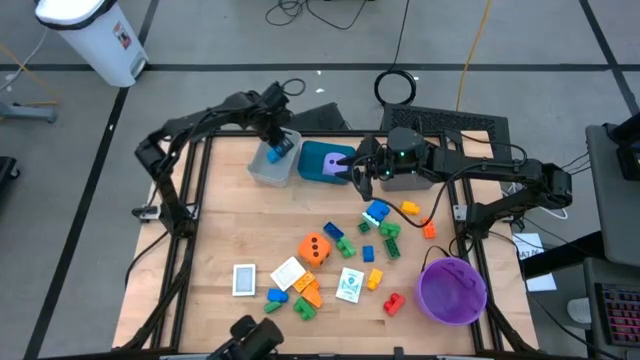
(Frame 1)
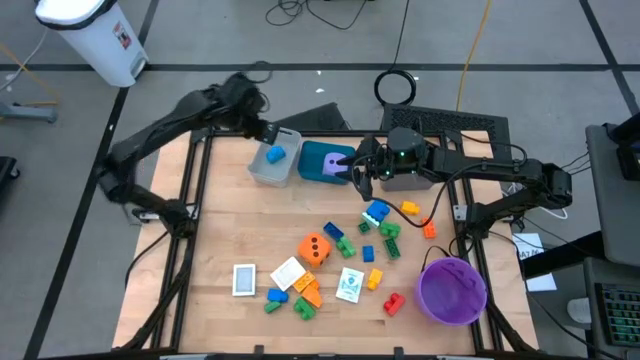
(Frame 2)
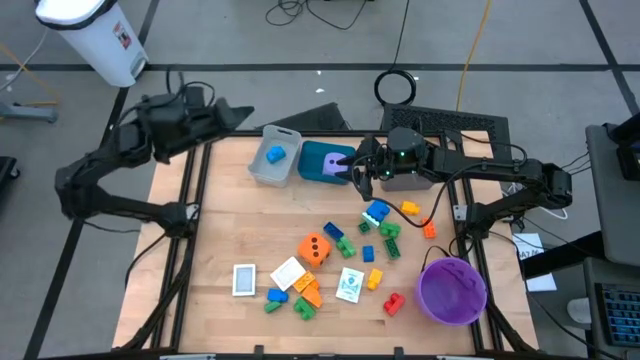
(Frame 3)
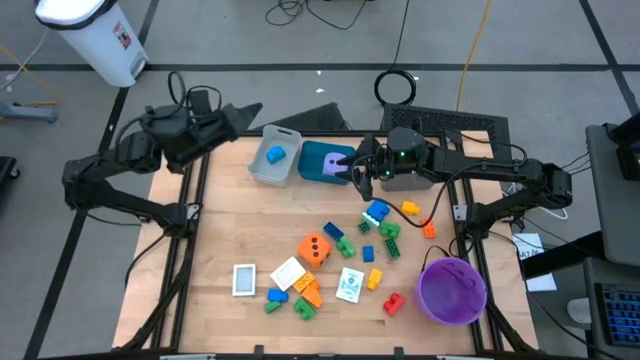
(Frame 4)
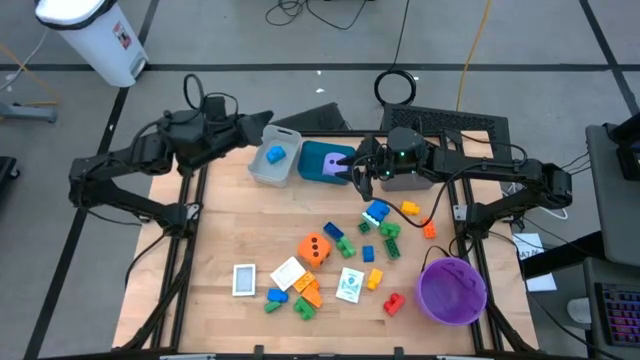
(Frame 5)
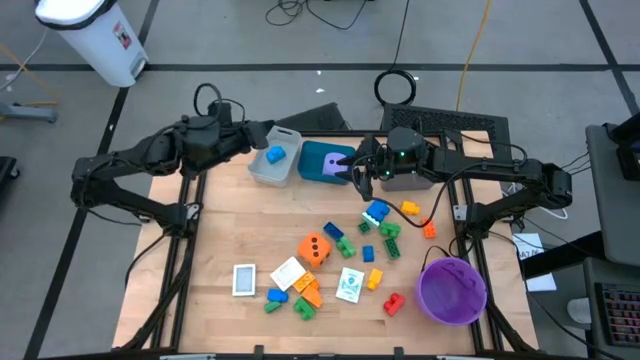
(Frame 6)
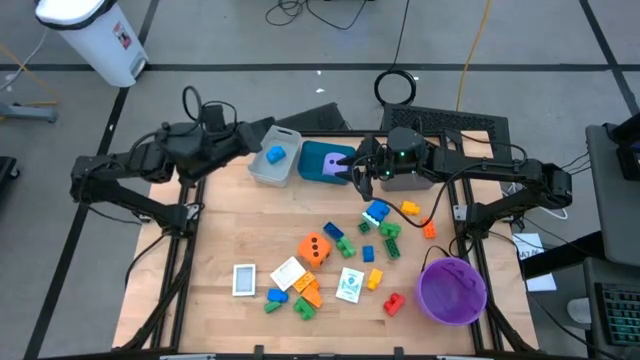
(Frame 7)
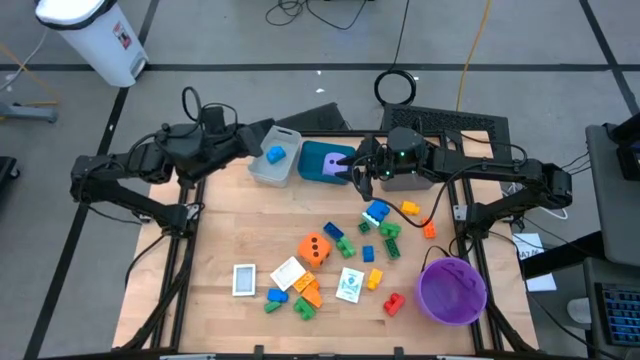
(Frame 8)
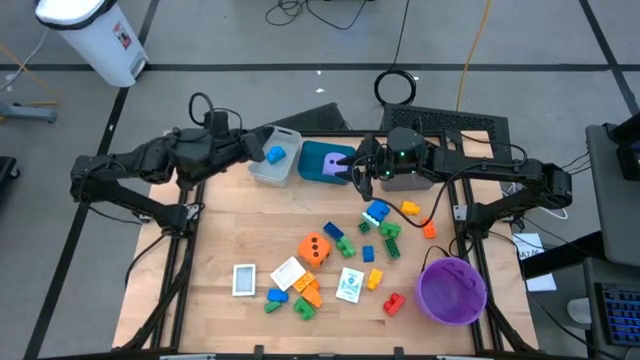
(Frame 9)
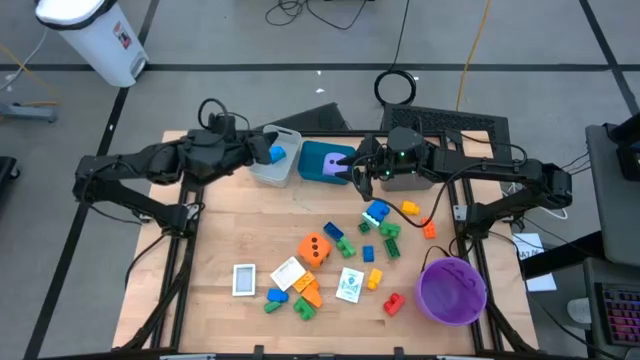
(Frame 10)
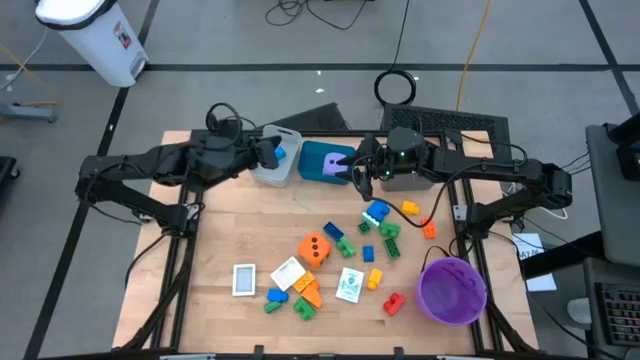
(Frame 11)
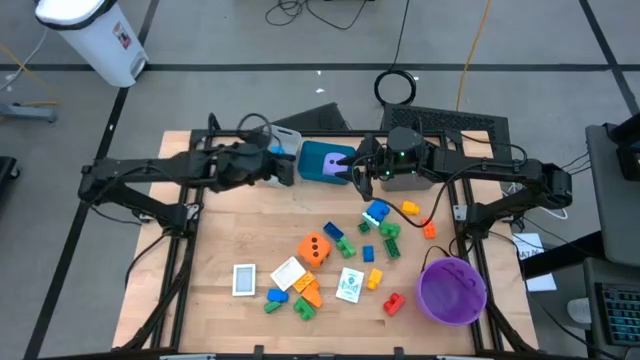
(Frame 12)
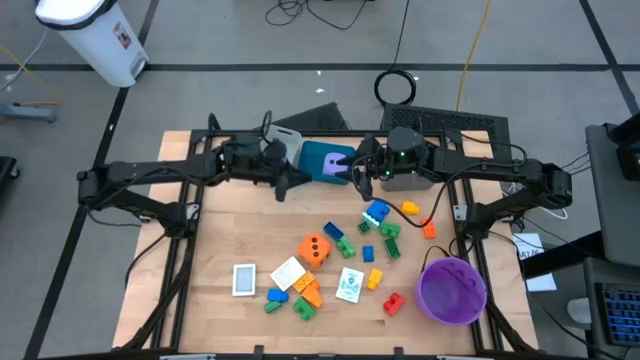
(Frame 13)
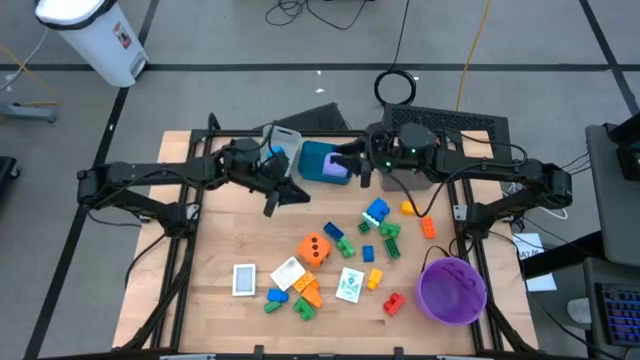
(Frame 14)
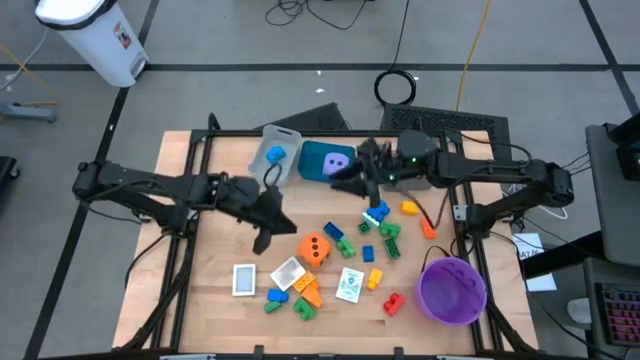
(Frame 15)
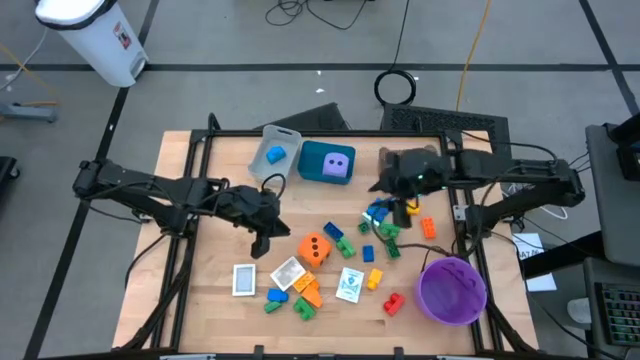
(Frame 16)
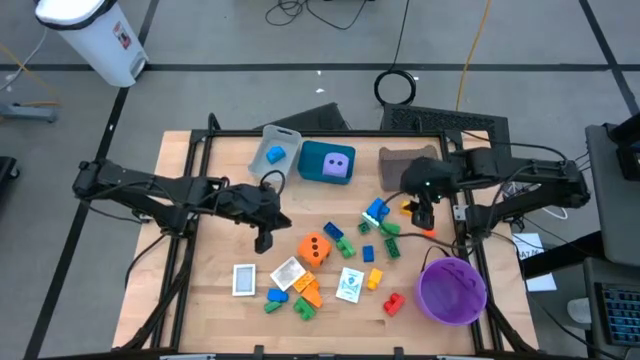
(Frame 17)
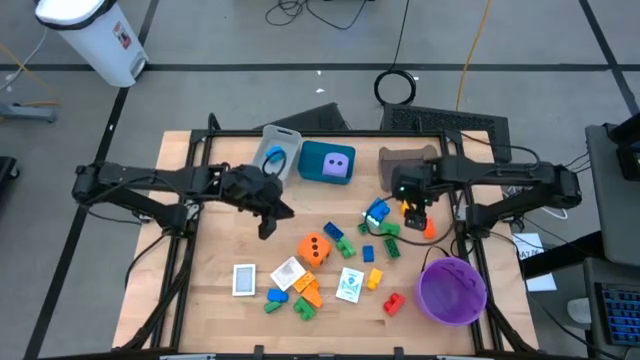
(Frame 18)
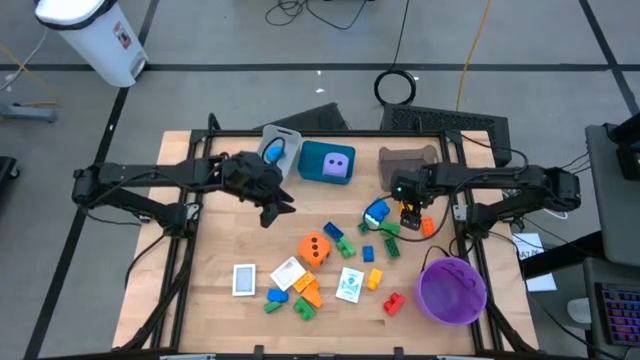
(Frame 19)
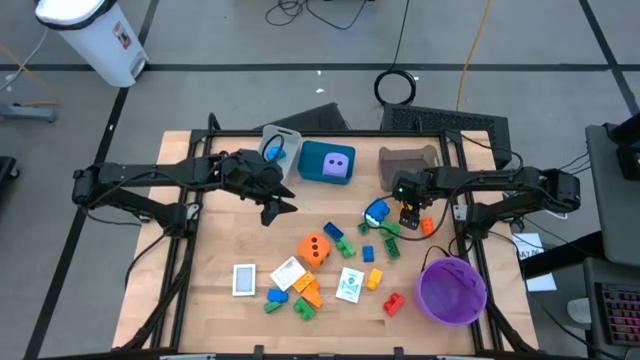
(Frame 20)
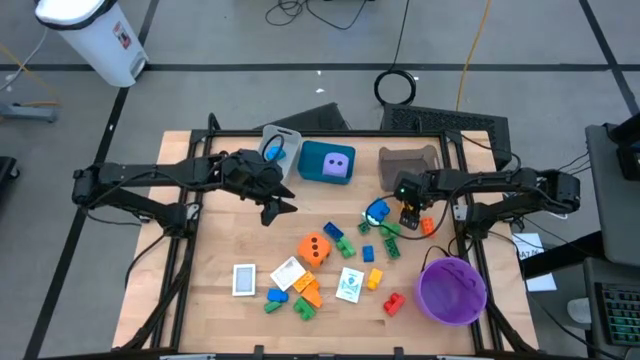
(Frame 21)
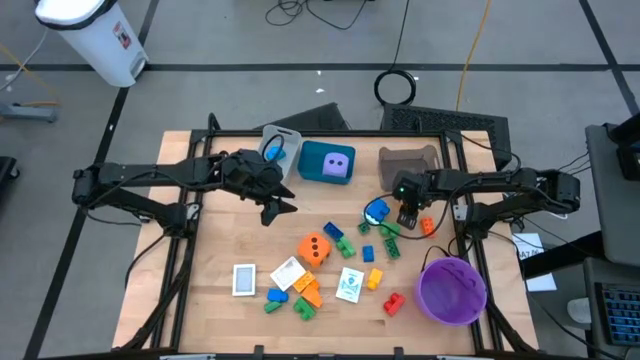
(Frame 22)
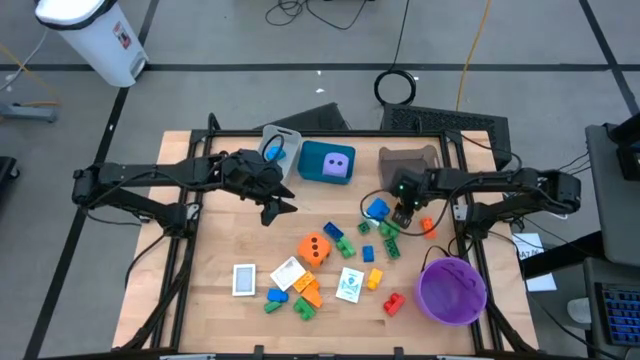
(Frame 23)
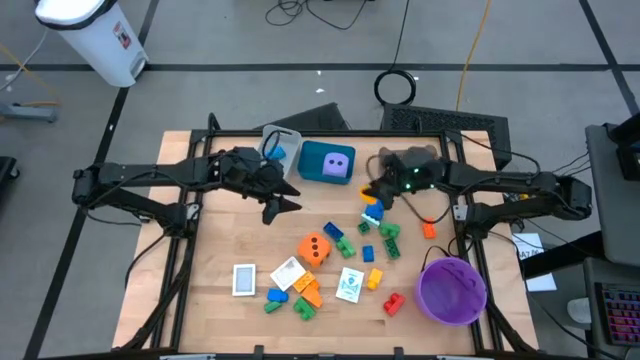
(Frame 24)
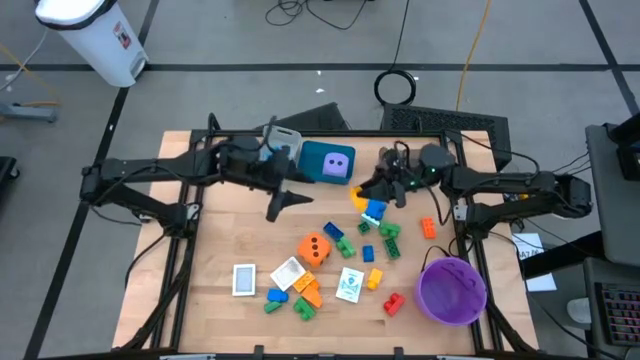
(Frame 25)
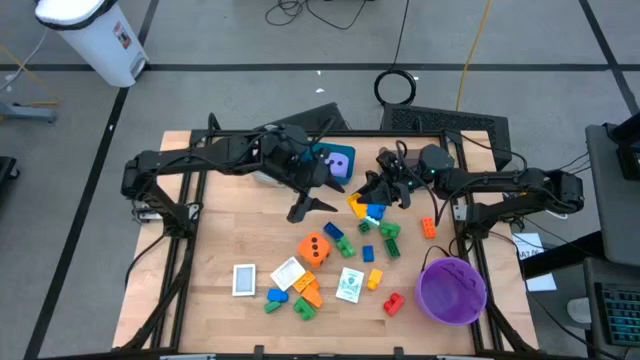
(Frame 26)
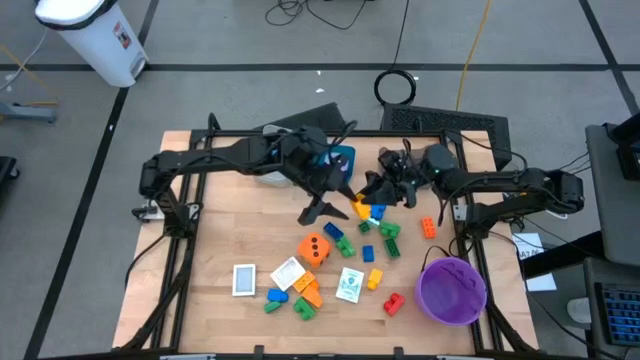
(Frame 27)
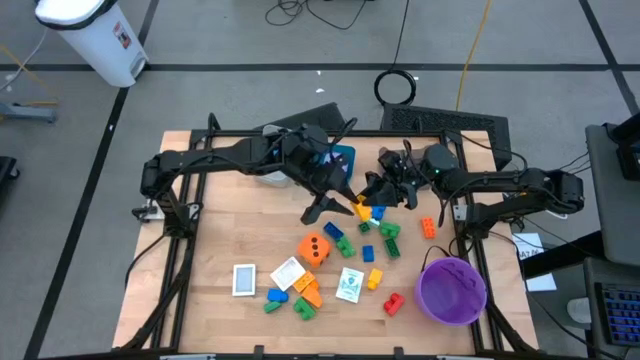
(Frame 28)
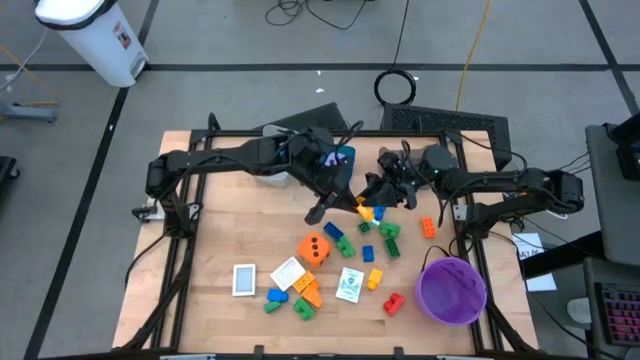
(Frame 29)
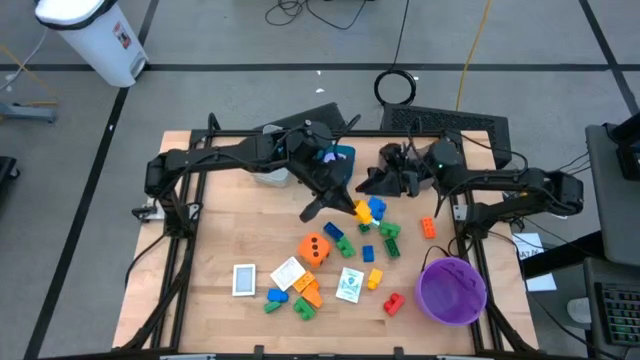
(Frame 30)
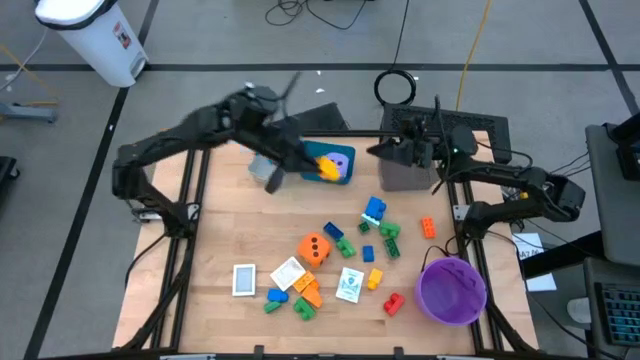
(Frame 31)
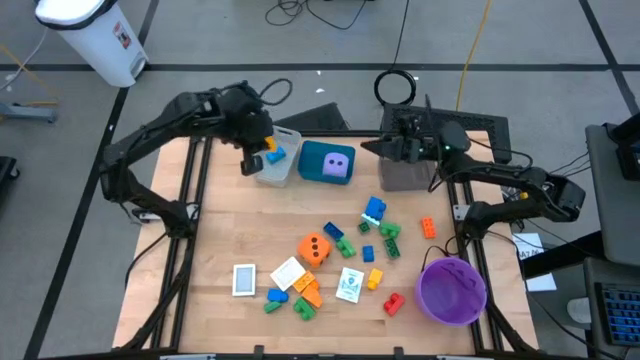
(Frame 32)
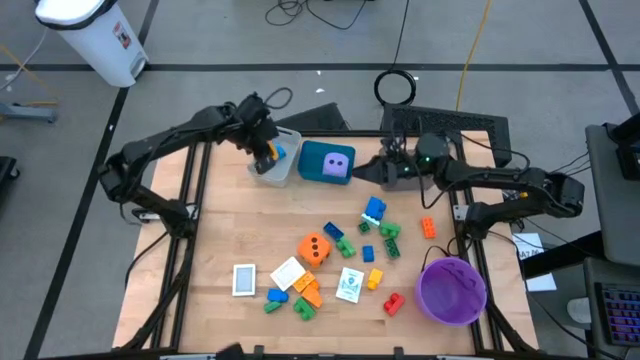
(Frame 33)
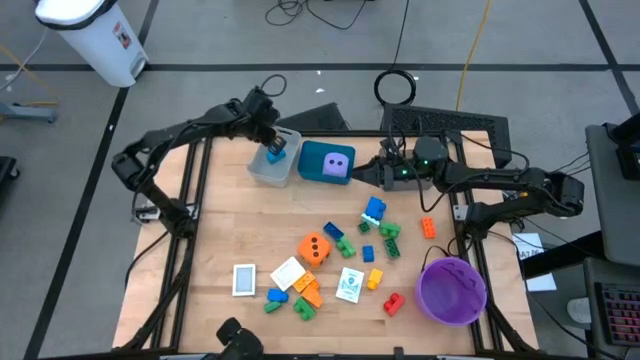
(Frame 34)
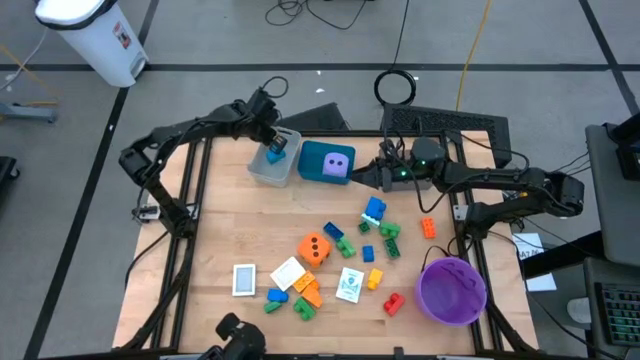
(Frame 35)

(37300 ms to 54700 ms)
Task: Pick & Place Toys
Put the yellow game piece into the gray bin
